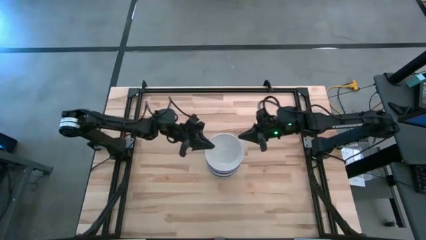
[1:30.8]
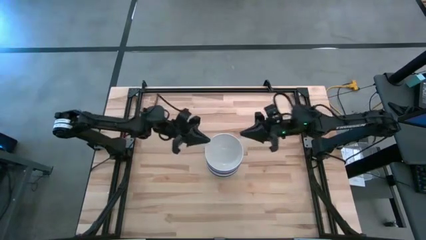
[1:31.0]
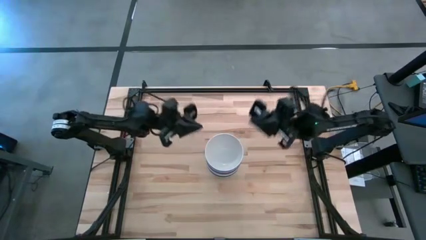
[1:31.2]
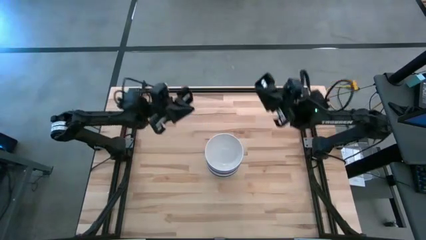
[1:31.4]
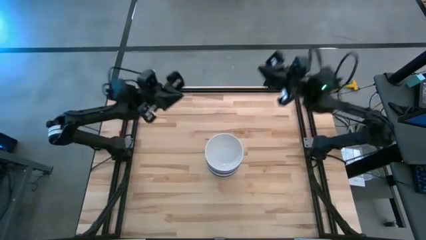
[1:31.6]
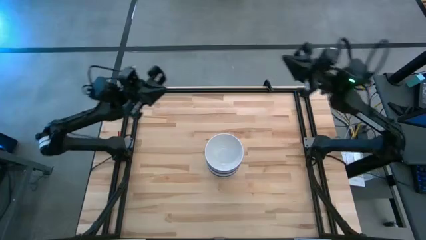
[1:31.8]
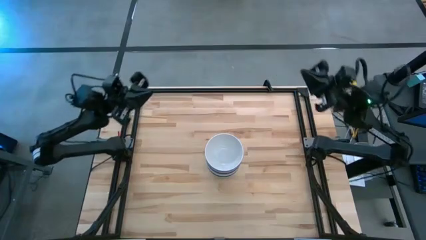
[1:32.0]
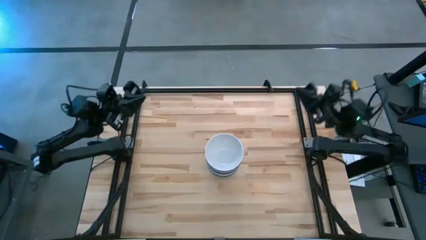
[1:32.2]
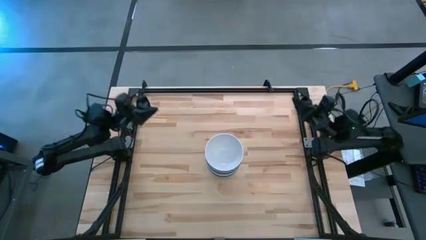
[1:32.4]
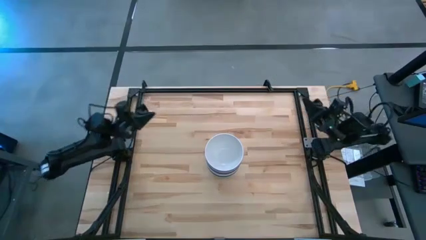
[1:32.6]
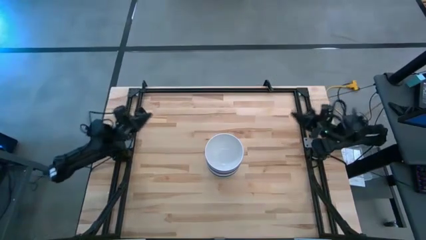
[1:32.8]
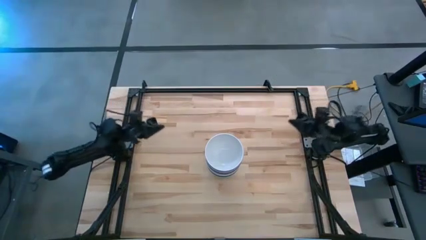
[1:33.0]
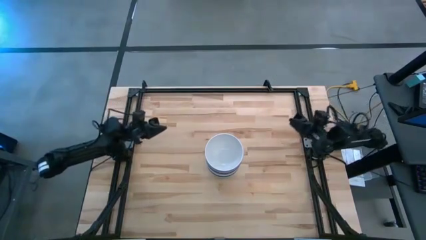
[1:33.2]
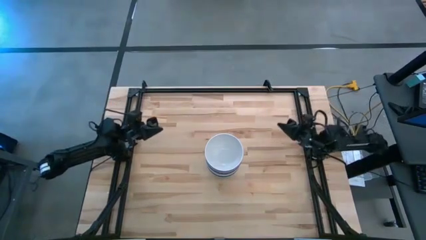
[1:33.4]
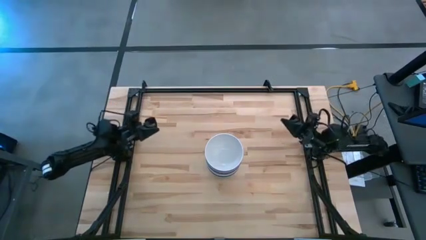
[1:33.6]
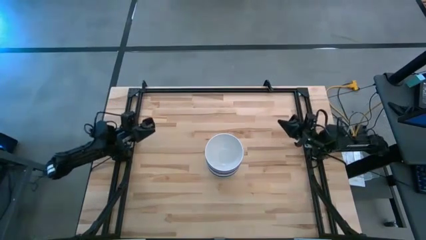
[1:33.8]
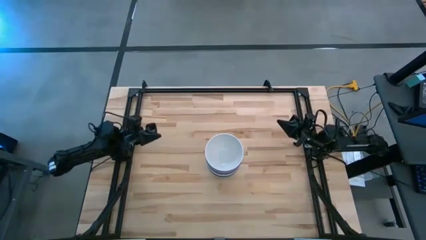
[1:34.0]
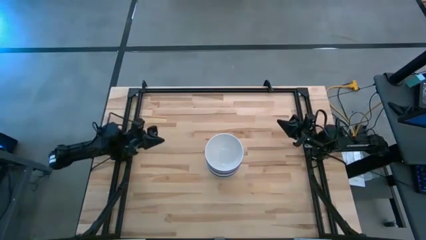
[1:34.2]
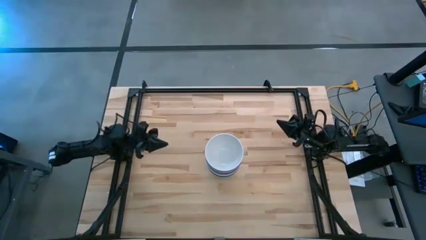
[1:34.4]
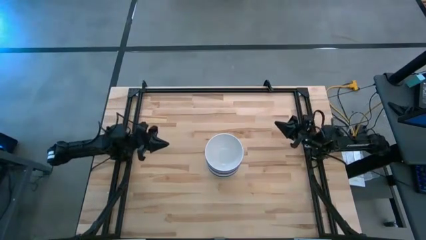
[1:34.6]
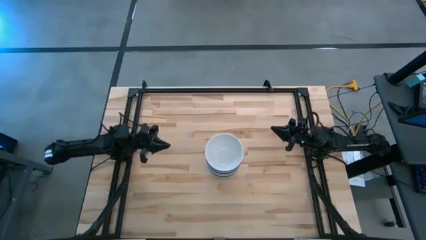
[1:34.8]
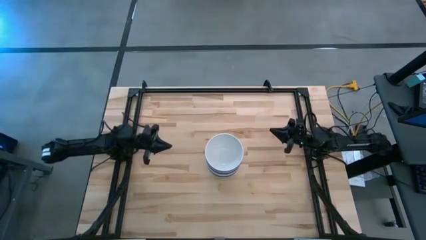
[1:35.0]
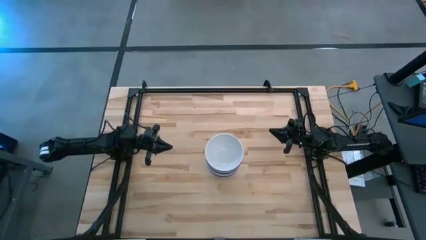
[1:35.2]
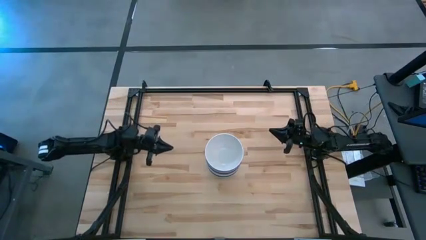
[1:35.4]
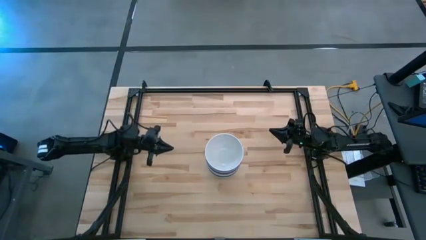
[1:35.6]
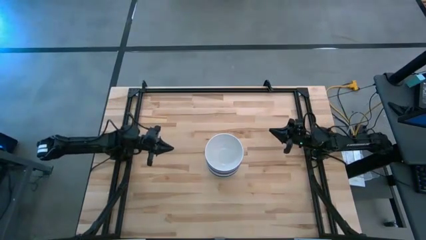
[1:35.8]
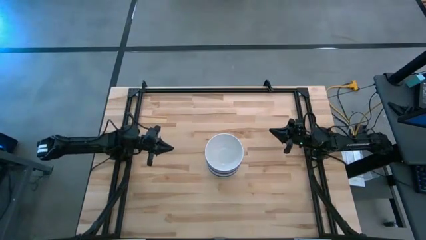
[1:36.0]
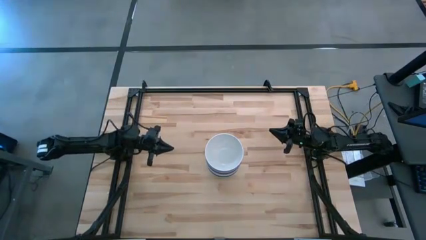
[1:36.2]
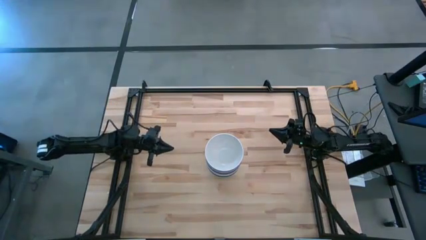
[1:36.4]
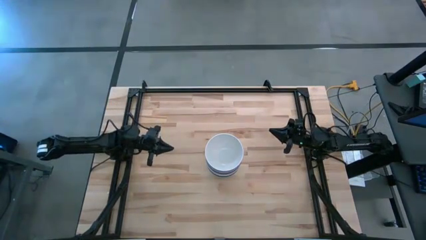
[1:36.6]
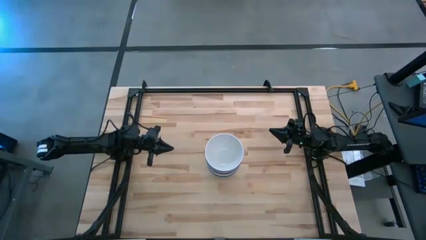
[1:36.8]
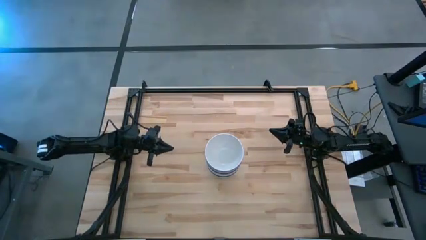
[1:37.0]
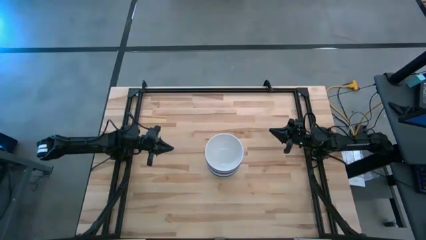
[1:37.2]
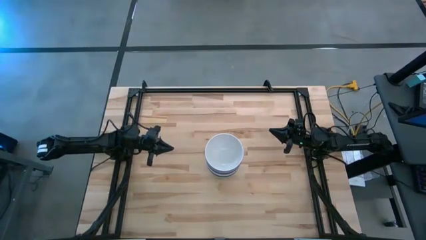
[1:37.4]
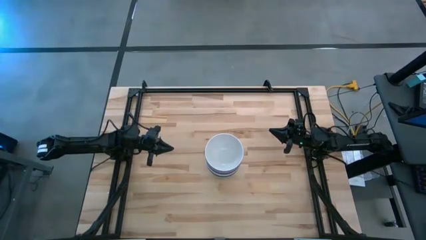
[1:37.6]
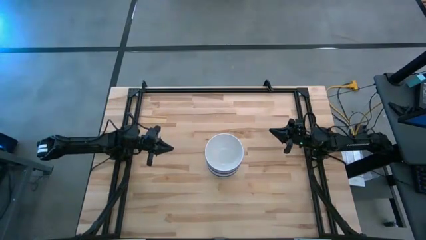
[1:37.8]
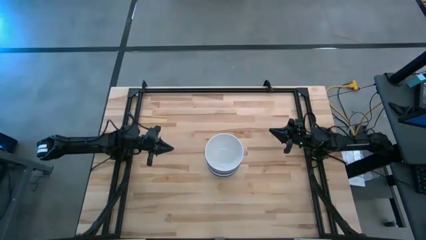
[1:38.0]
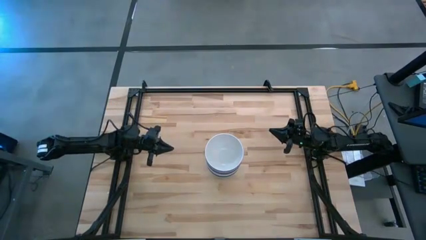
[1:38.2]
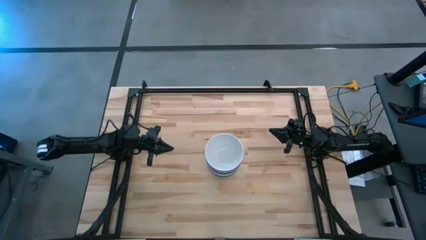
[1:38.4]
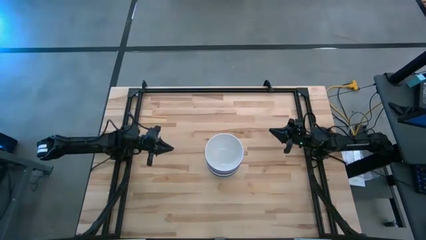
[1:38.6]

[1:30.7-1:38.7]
Task: Nest bowls inside each other
Return to Home Position

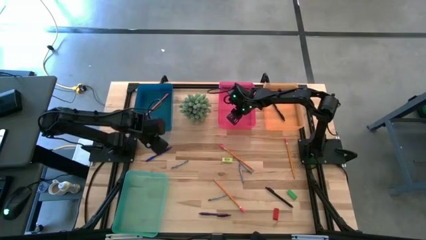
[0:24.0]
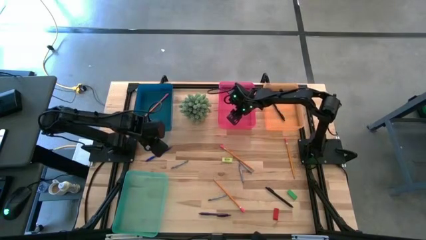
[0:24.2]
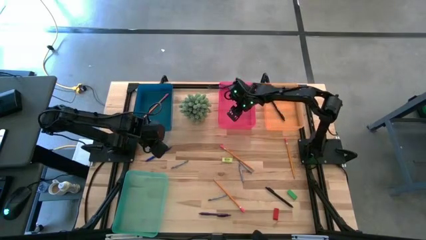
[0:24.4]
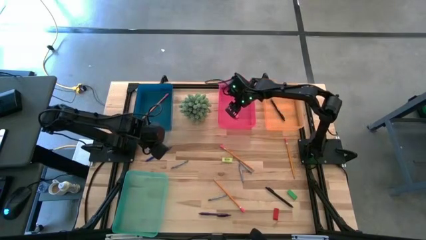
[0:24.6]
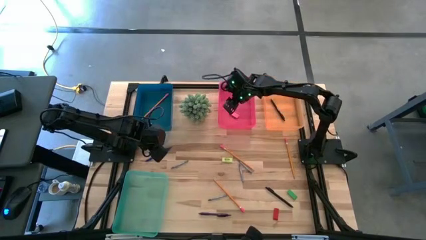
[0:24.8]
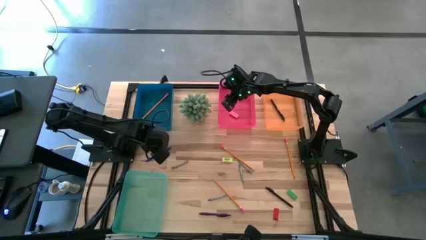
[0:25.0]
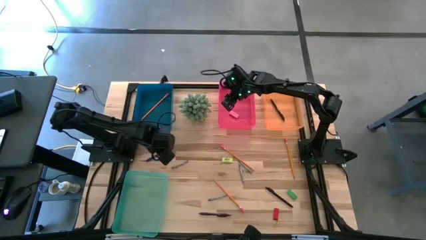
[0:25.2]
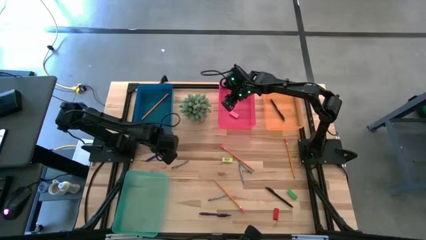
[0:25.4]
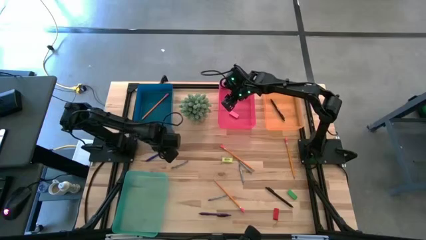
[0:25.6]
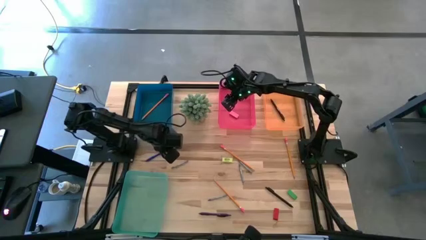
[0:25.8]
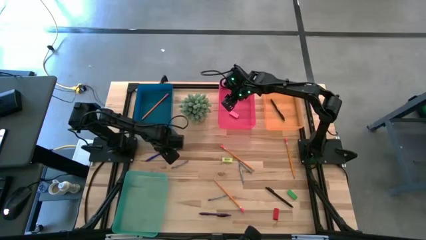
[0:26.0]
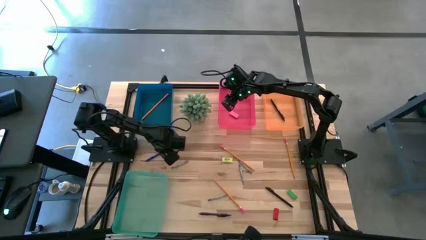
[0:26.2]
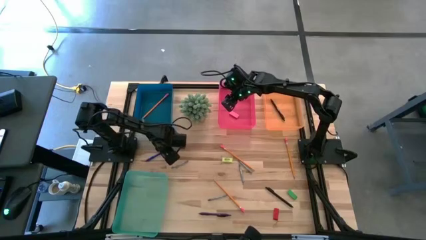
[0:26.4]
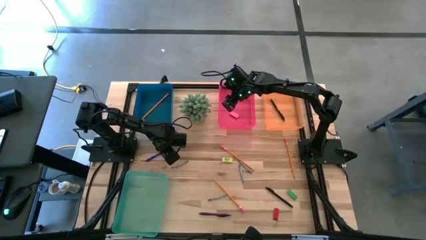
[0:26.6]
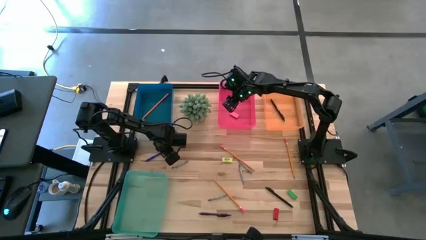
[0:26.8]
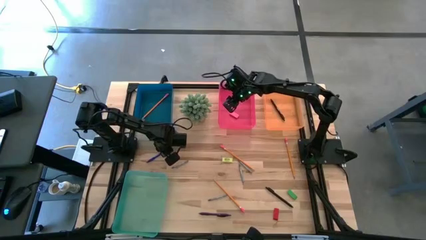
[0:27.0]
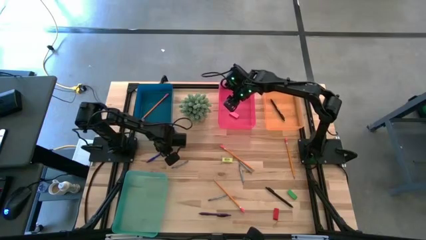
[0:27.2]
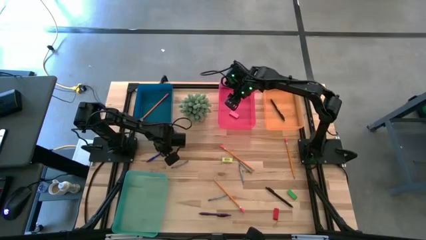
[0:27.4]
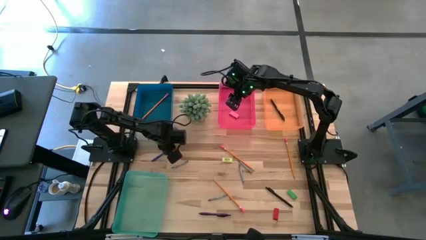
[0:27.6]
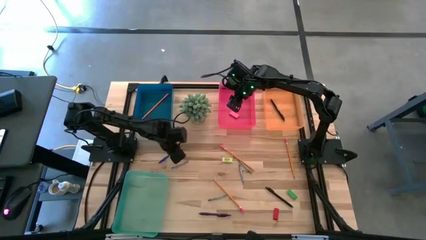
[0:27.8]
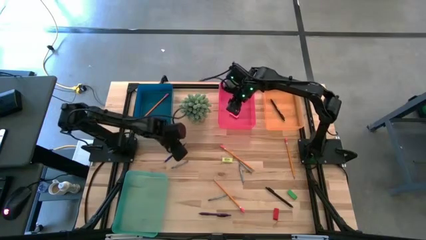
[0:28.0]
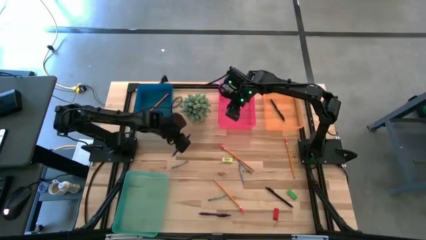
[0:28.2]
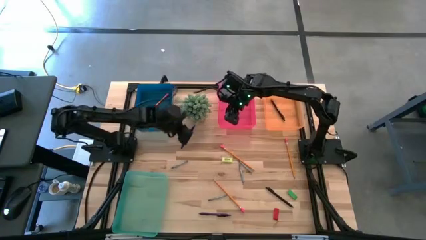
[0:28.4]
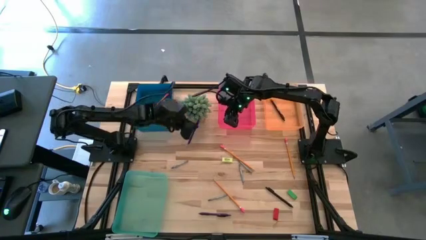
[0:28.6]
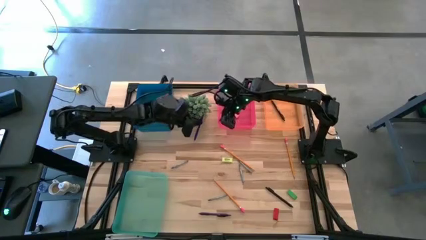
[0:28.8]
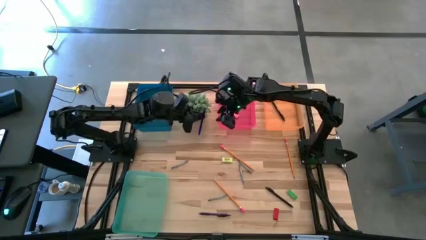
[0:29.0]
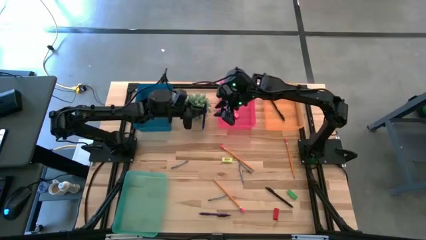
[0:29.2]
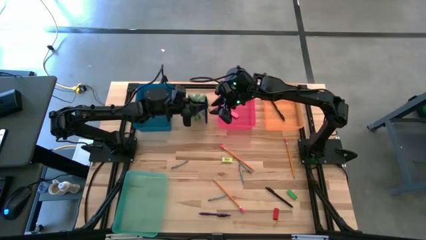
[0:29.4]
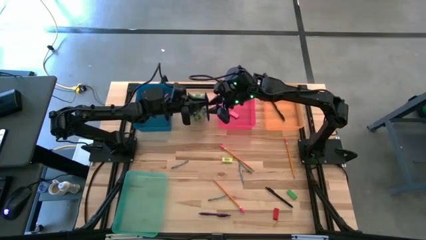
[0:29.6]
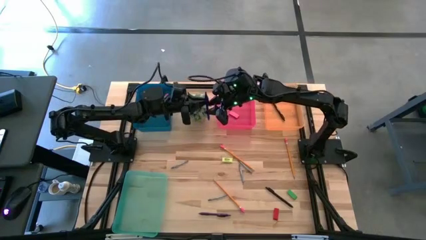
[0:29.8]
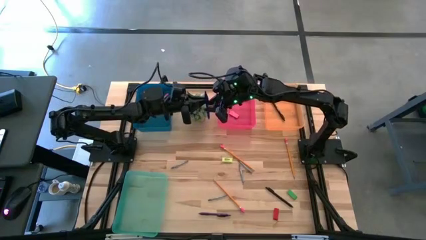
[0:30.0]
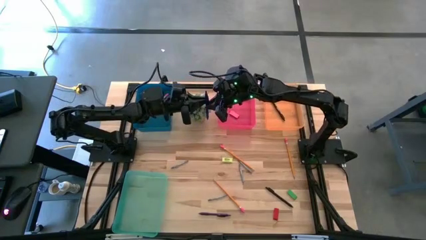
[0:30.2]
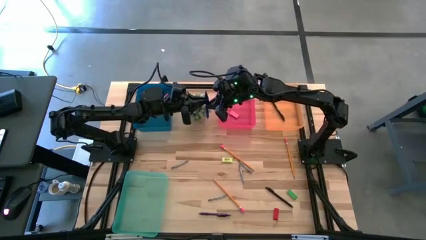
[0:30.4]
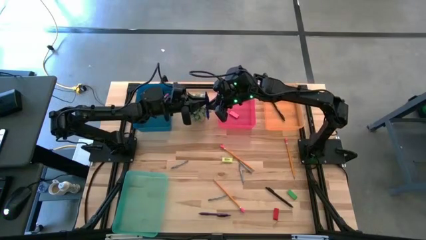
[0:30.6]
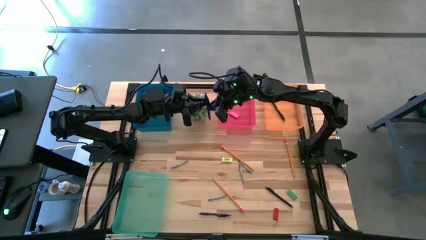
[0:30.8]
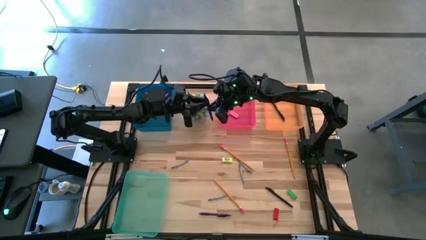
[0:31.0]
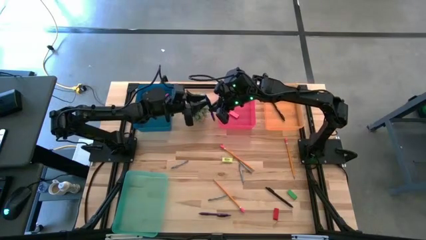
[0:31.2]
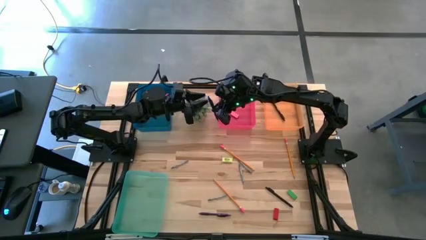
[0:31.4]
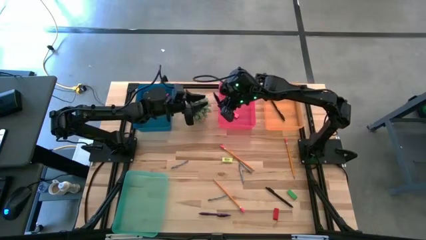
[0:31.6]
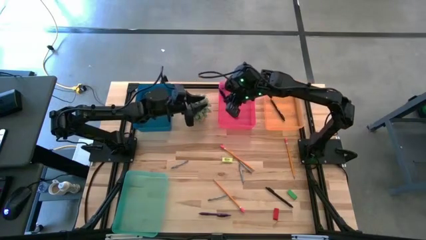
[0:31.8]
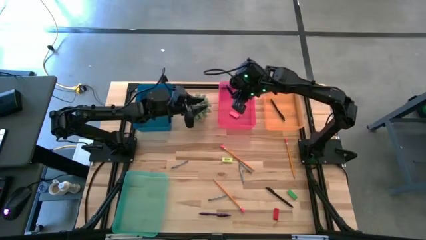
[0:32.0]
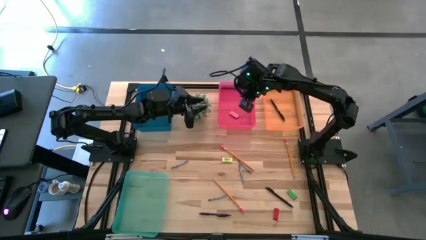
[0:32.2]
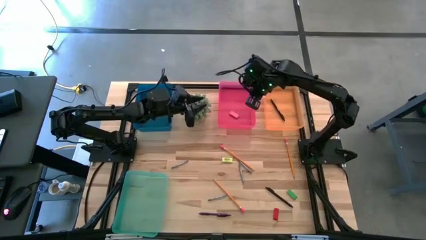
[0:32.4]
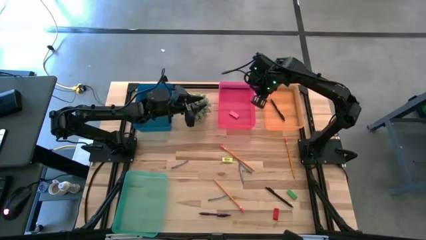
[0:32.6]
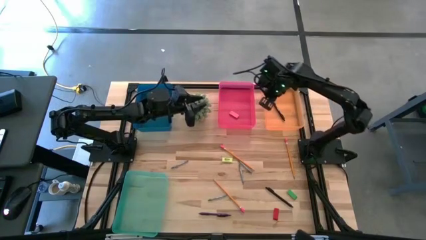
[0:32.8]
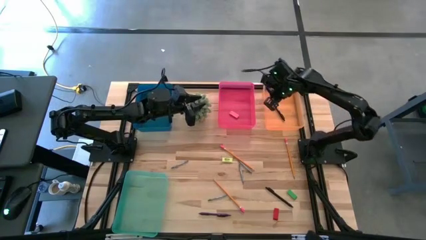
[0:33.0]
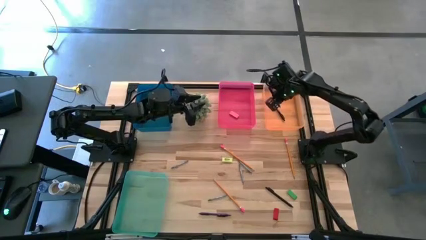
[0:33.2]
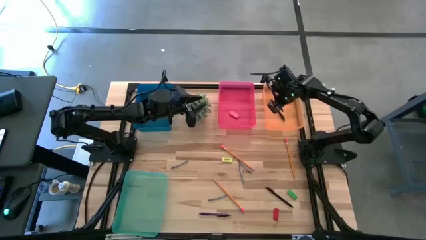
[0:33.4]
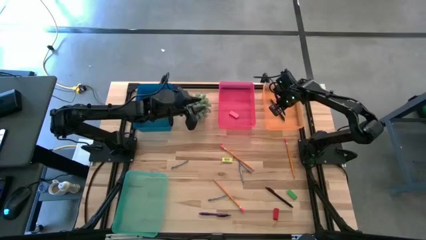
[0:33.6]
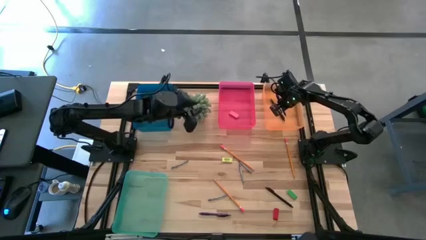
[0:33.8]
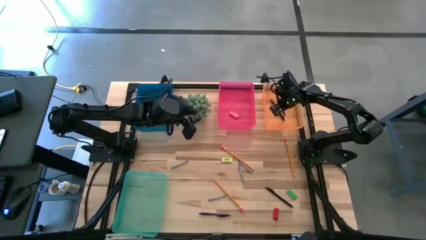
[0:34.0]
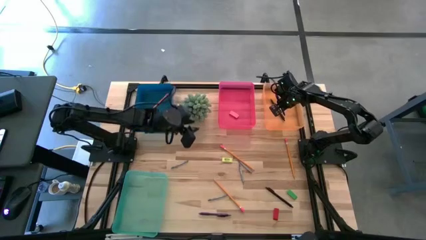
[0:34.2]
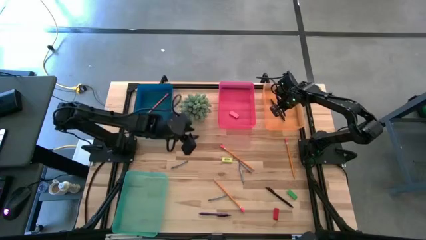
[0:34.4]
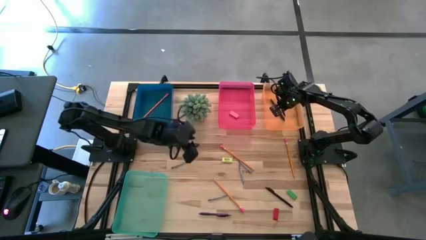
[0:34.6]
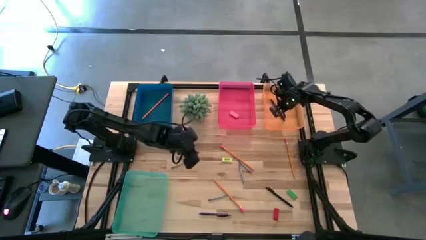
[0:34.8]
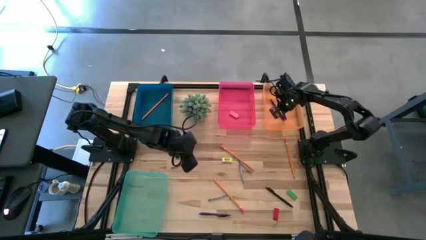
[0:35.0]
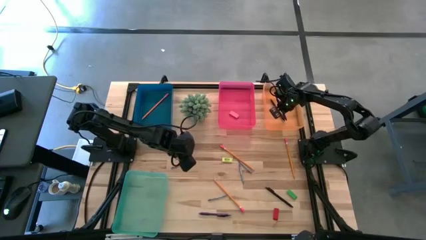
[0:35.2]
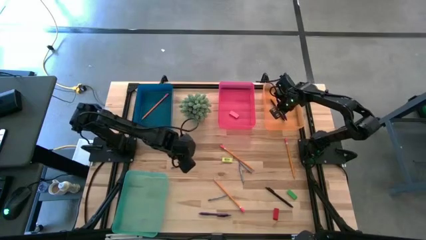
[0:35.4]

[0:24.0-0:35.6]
Task: Sort crayons/erasers/pens/pencils in bins
Put the blue pen into the orange bin
